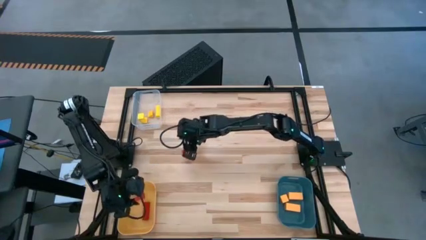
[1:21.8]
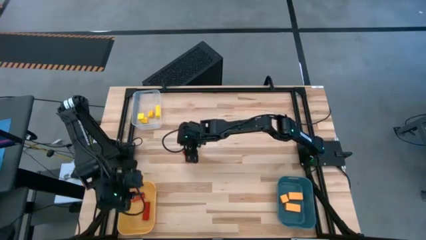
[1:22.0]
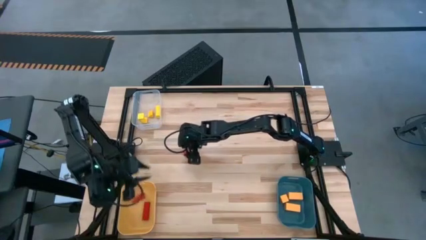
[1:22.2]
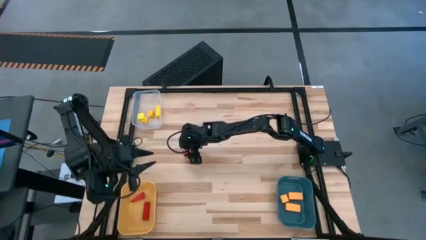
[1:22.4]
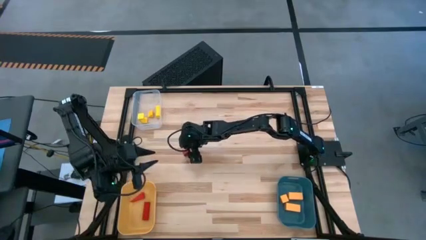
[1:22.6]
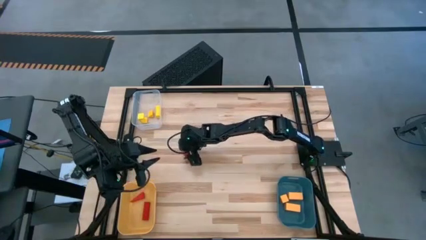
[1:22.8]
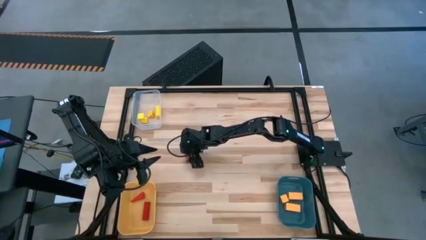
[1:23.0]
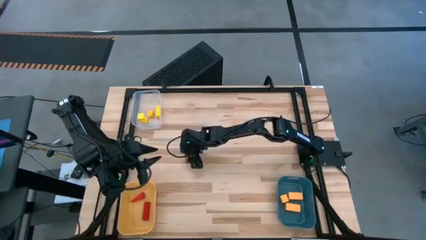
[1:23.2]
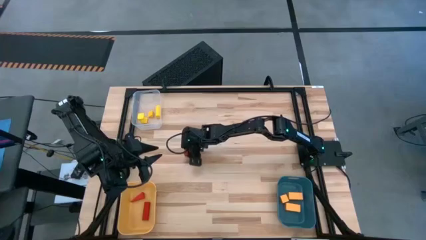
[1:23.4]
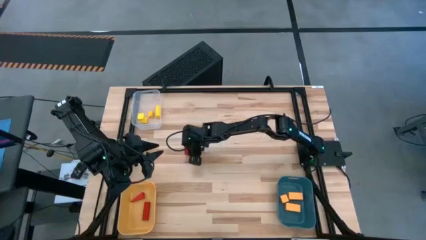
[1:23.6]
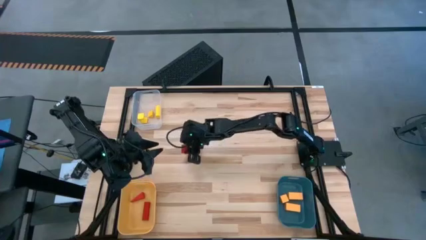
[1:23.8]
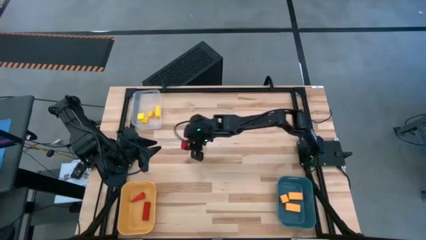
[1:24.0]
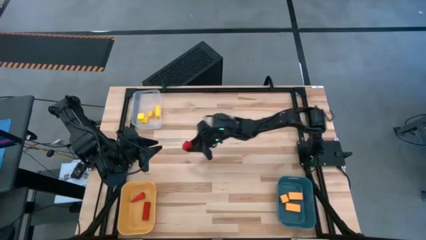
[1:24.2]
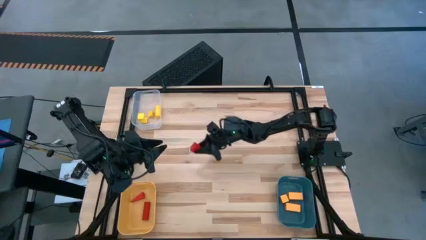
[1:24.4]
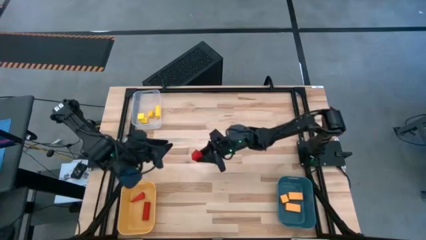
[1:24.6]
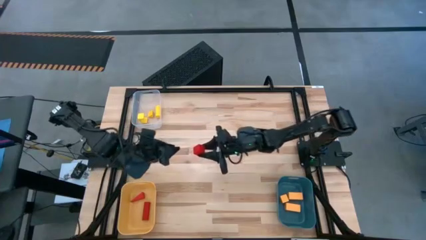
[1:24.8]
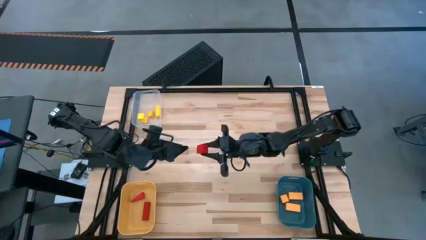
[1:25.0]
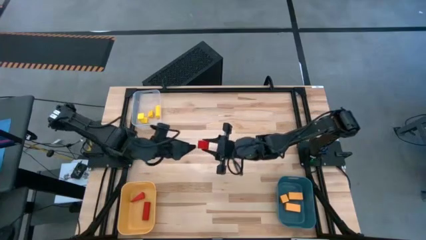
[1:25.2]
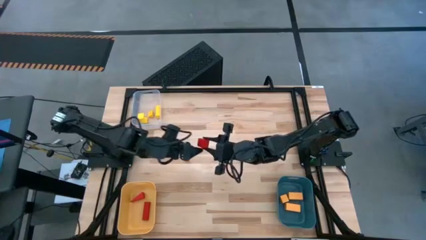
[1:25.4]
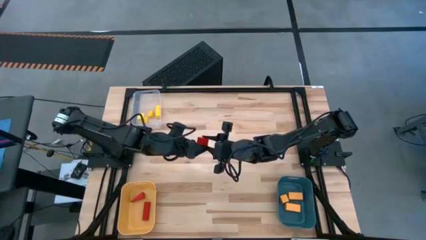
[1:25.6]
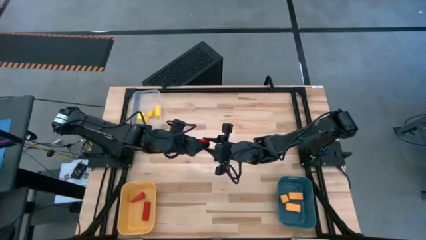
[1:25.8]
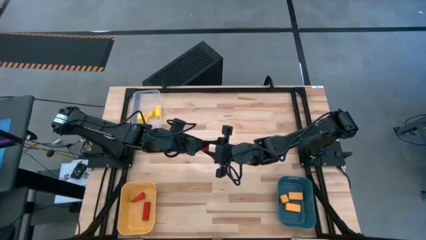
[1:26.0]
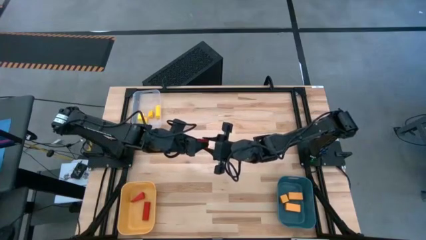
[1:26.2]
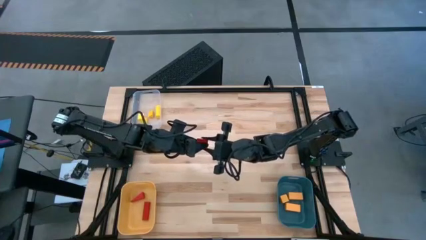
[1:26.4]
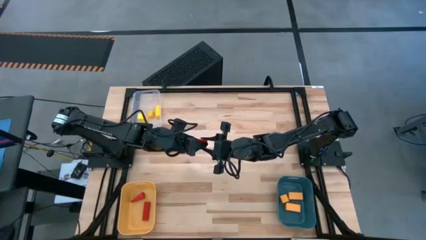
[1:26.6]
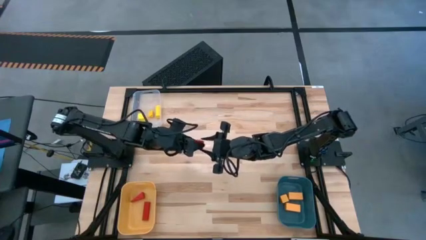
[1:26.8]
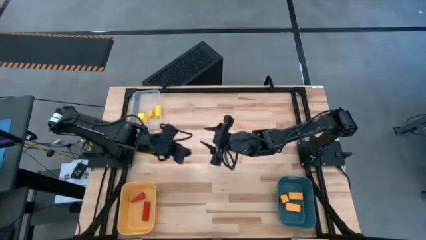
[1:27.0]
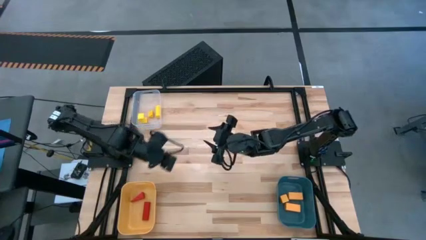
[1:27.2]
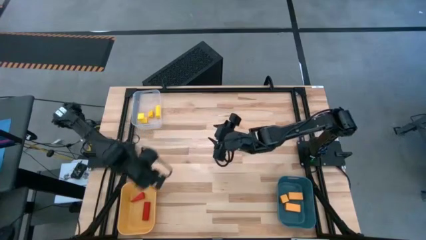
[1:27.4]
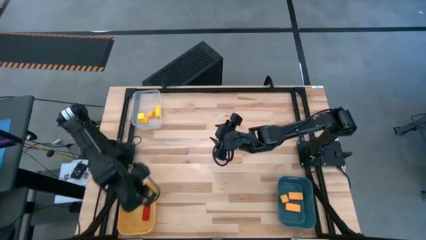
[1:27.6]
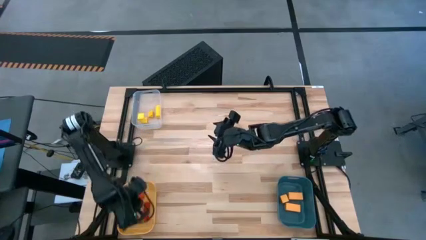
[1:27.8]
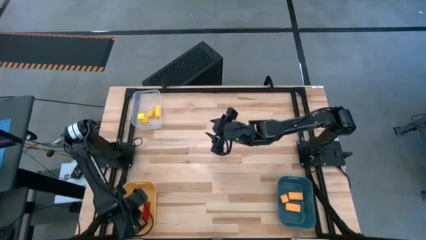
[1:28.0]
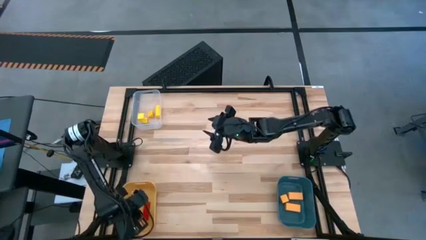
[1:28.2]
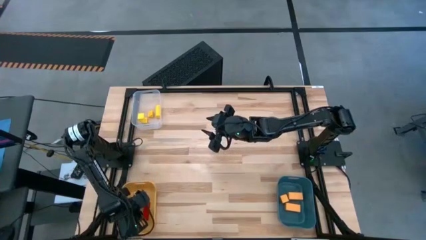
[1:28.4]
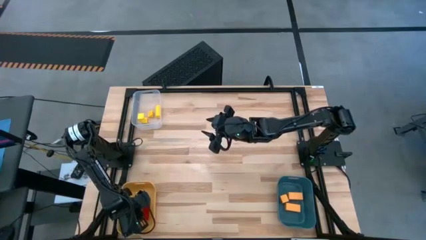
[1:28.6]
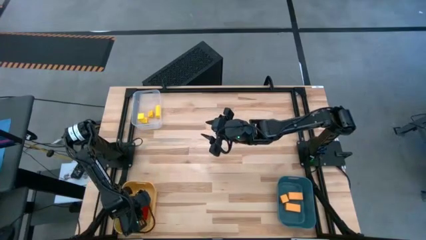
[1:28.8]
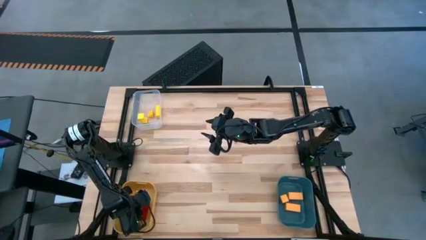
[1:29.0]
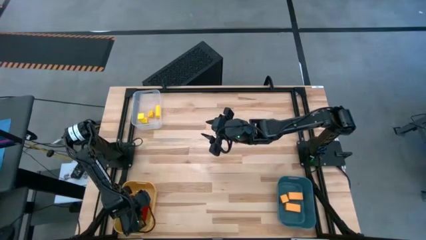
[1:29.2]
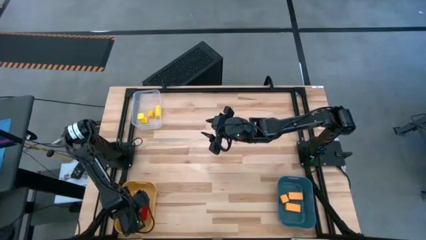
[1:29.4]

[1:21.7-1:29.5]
Task: Sort & place blocks by color
Put the red block into the yellow bin

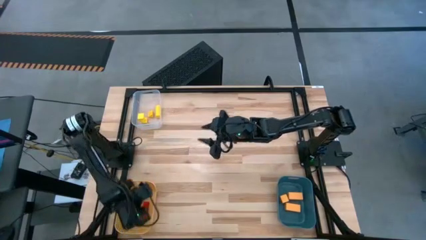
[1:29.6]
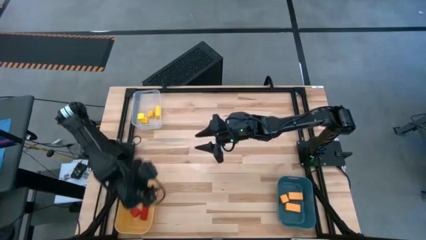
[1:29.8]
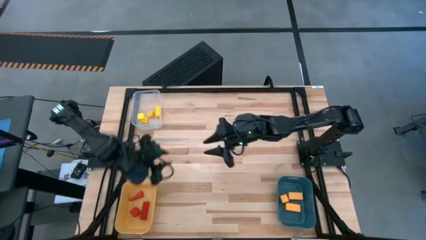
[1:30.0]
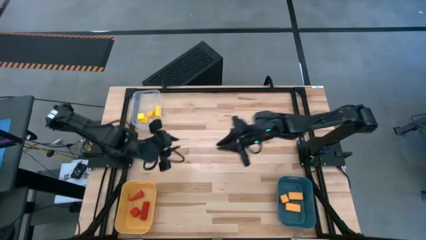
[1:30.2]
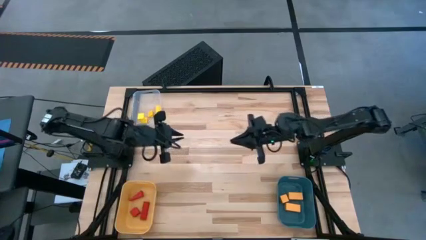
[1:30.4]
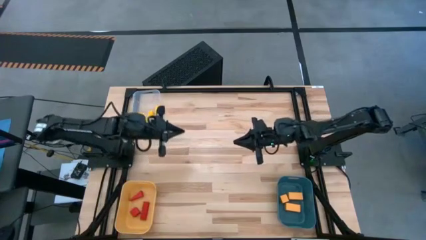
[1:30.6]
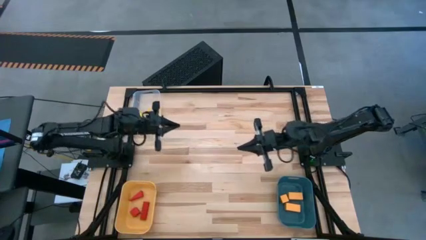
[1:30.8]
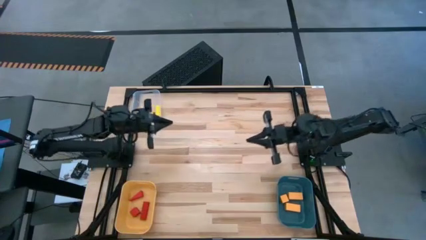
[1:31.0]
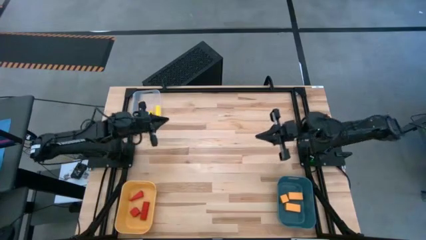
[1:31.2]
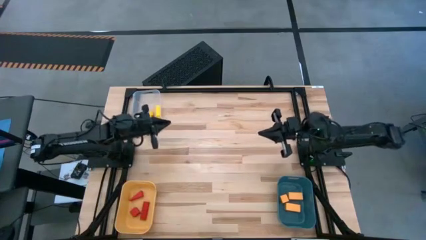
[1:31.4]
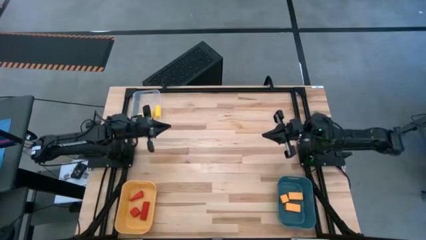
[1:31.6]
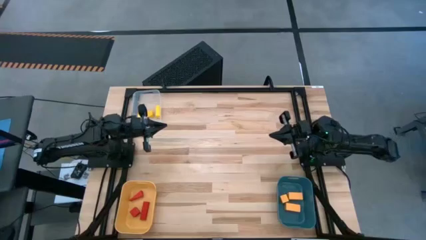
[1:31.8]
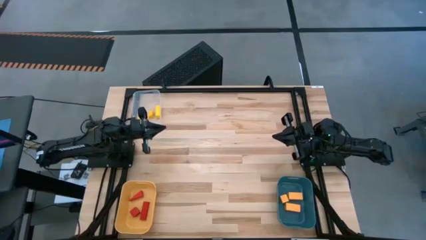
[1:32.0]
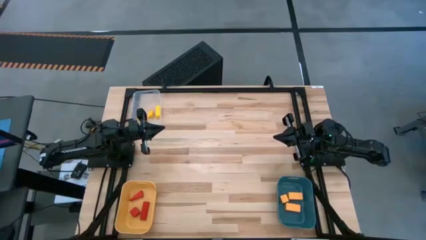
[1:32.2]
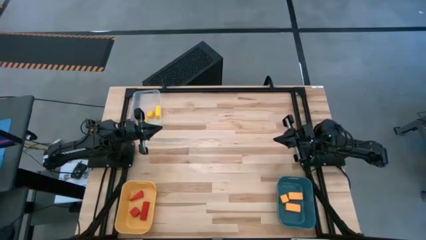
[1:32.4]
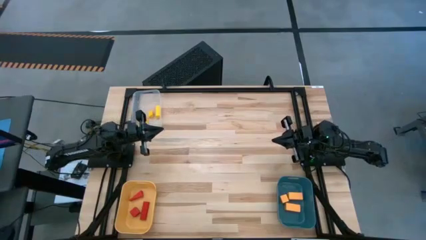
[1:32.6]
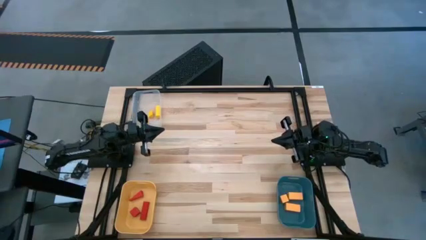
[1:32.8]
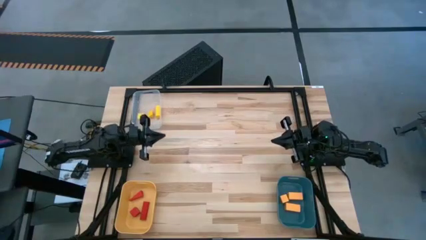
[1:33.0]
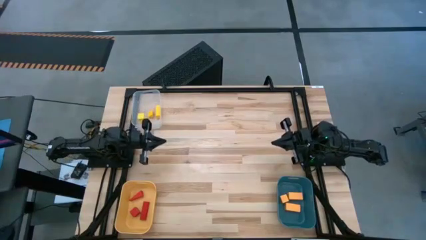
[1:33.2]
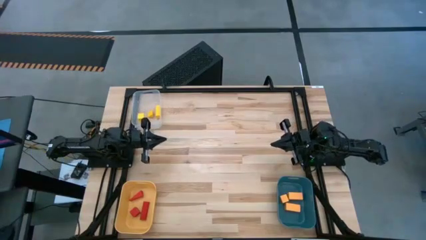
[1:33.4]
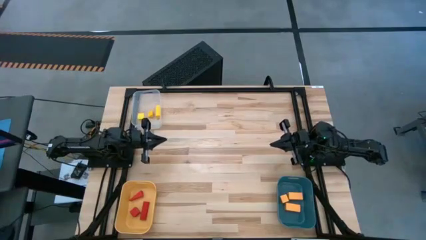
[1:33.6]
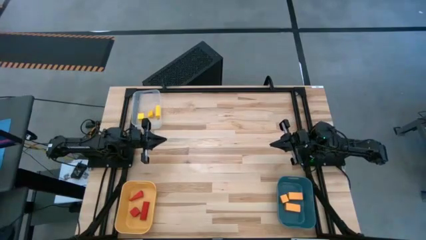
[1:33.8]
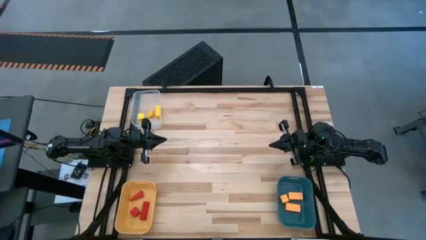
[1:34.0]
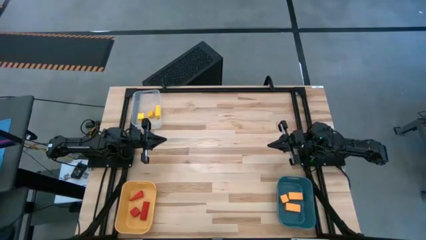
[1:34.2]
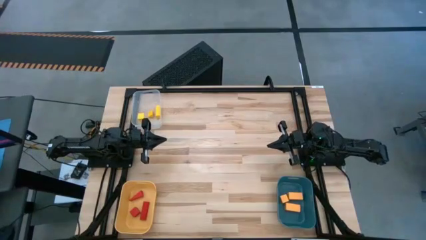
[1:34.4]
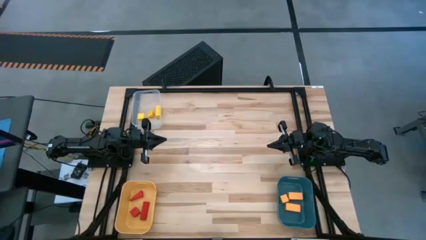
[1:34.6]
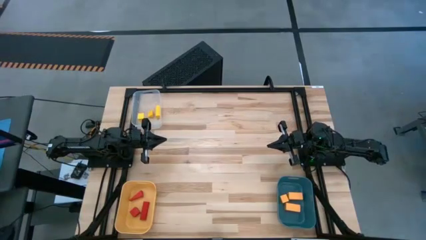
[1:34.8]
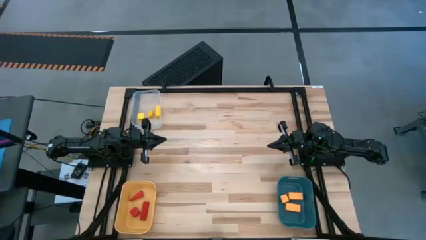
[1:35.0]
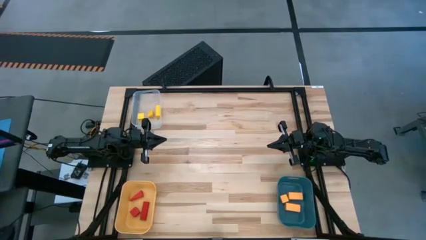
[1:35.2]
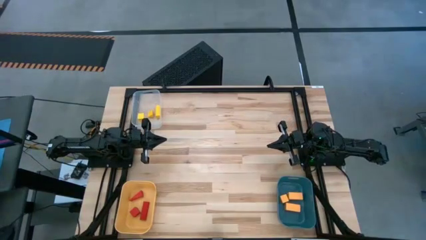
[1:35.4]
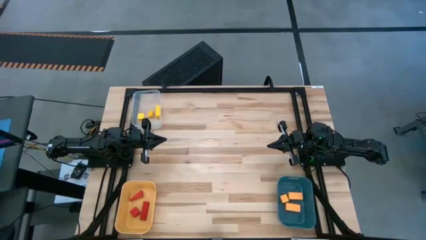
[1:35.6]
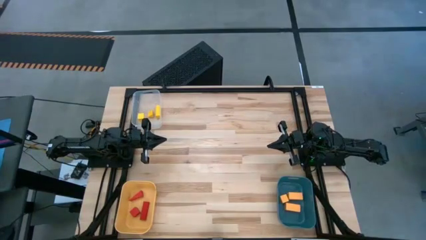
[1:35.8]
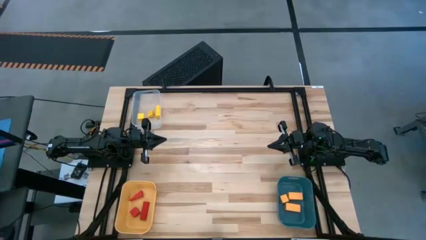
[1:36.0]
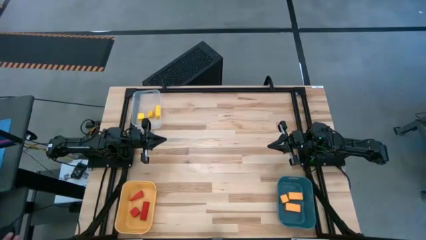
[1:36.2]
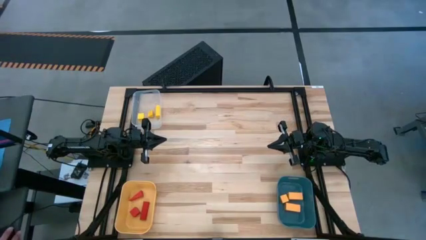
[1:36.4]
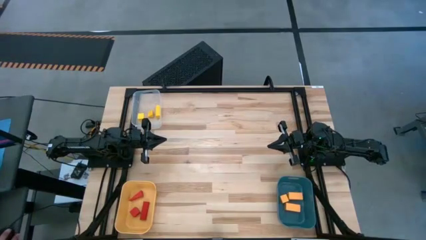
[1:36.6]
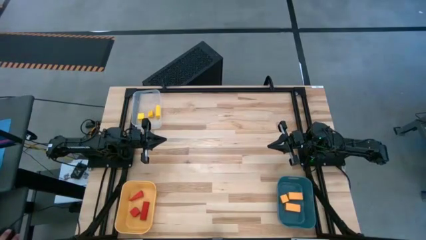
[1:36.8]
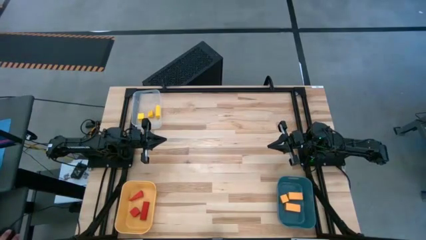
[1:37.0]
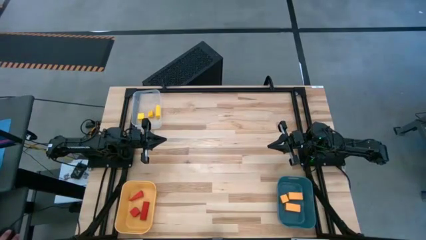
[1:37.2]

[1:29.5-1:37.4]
Return to Home Position

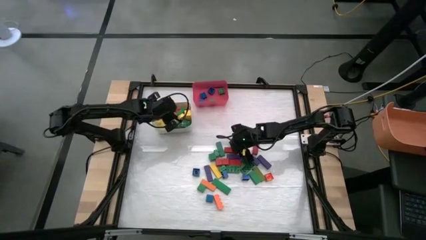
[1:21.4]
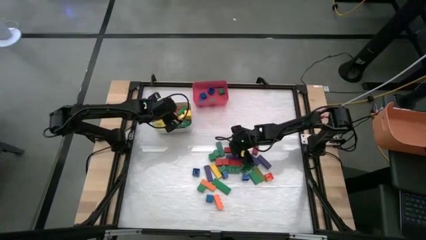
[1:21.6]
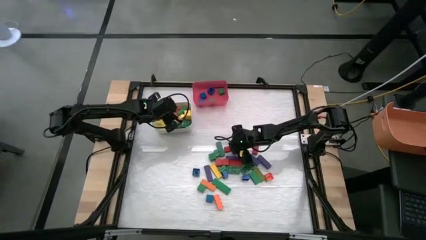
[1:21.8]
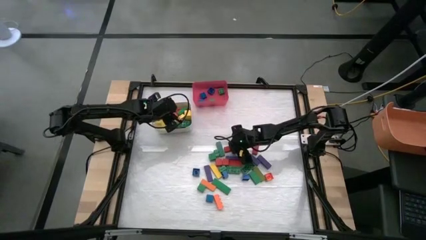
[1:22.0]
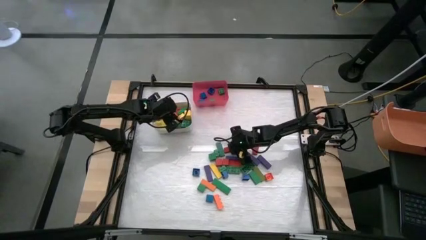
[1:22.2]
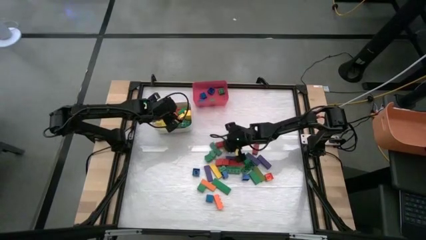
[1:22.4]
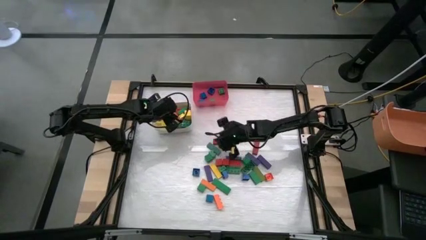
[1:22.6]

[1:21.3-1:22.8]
Task: Sort blocks by size
Put the large red wooden block into the white bin
